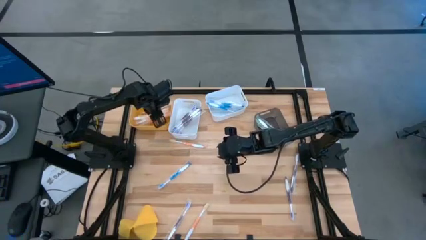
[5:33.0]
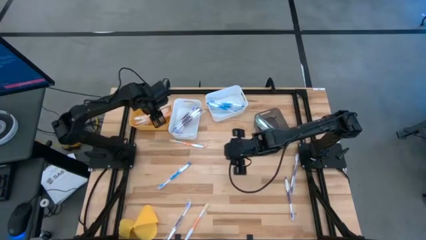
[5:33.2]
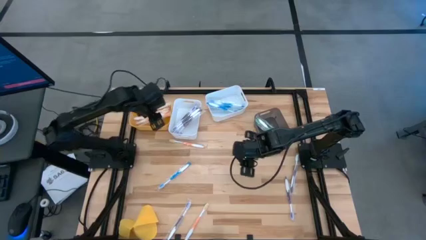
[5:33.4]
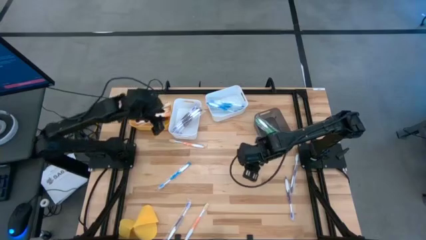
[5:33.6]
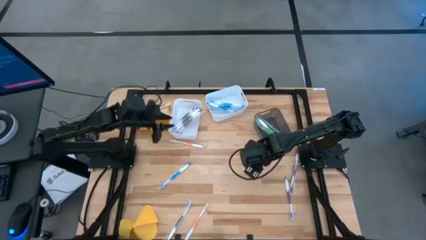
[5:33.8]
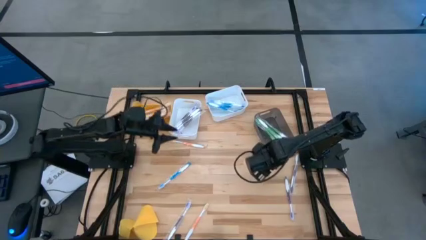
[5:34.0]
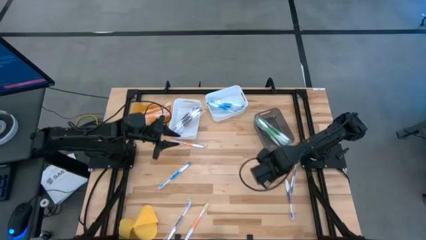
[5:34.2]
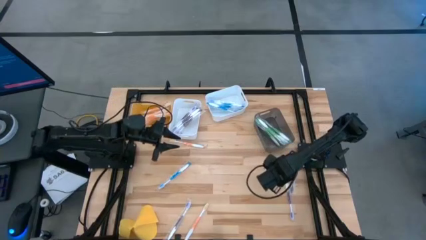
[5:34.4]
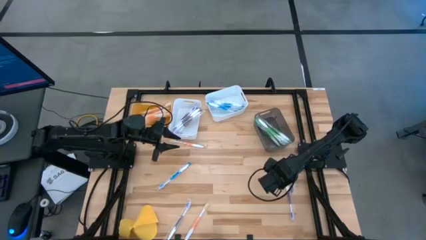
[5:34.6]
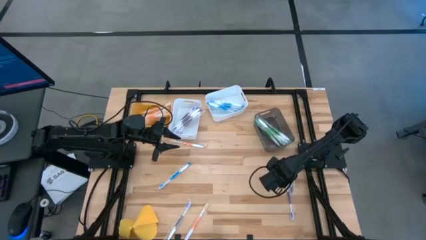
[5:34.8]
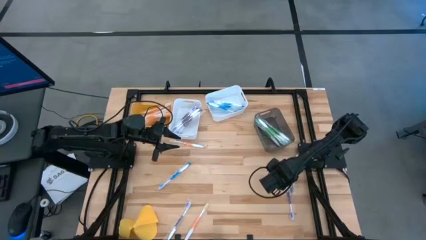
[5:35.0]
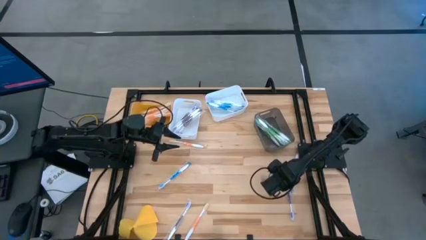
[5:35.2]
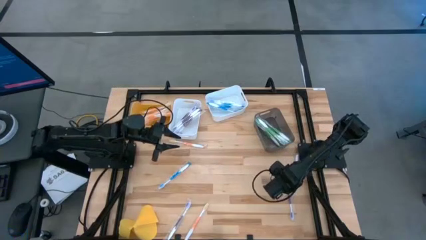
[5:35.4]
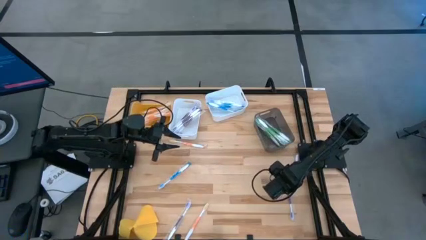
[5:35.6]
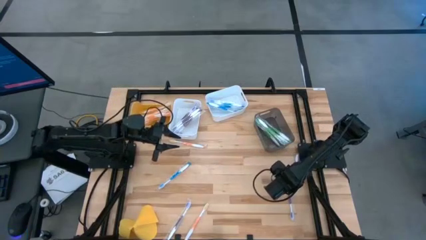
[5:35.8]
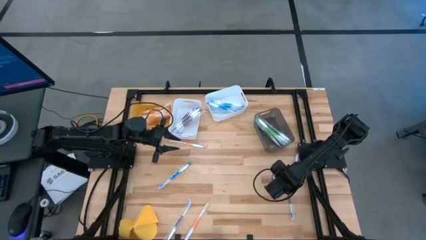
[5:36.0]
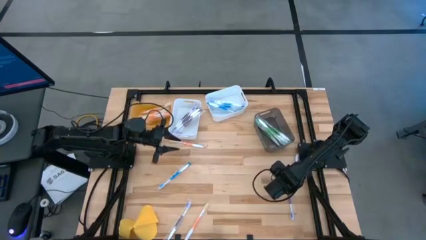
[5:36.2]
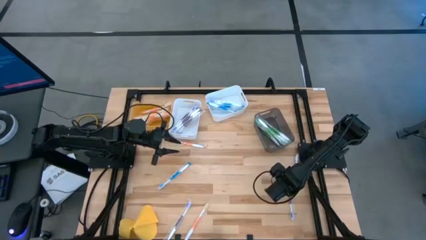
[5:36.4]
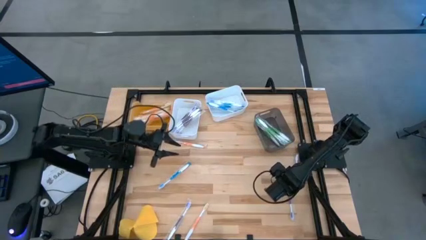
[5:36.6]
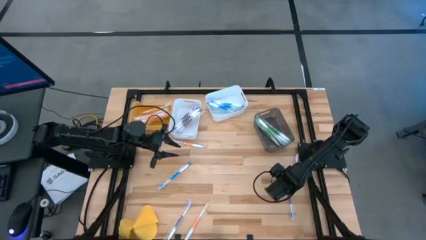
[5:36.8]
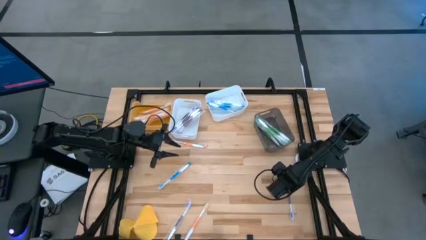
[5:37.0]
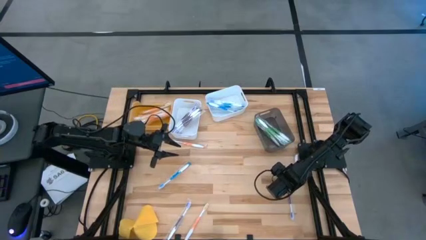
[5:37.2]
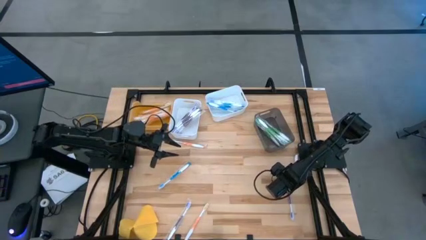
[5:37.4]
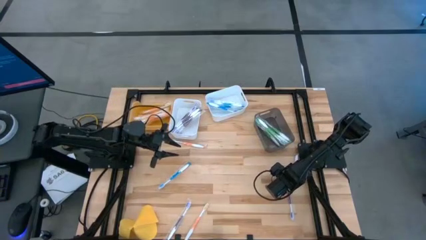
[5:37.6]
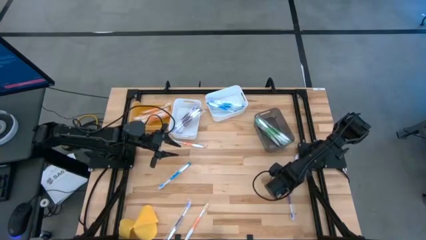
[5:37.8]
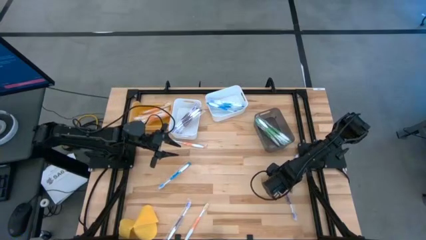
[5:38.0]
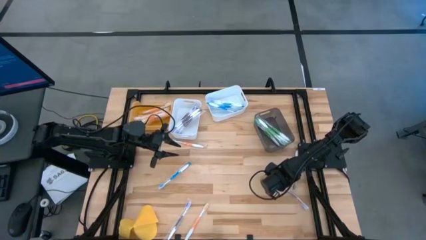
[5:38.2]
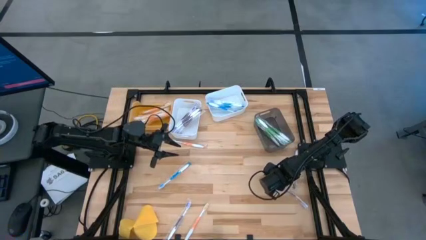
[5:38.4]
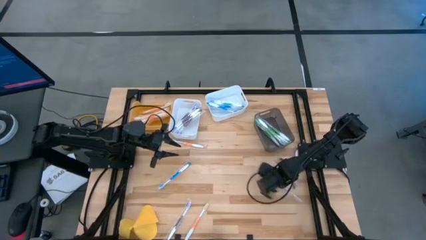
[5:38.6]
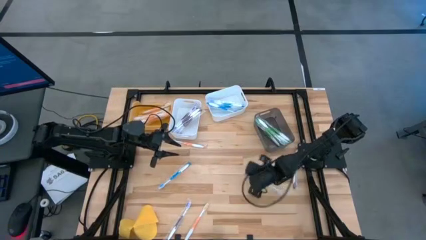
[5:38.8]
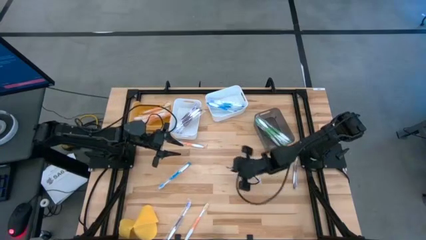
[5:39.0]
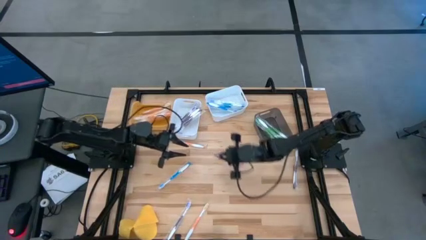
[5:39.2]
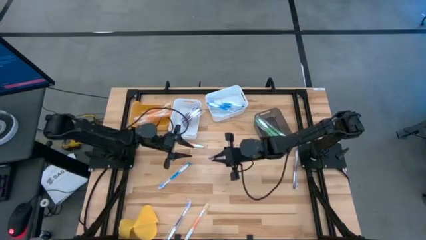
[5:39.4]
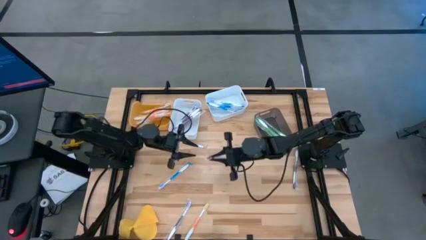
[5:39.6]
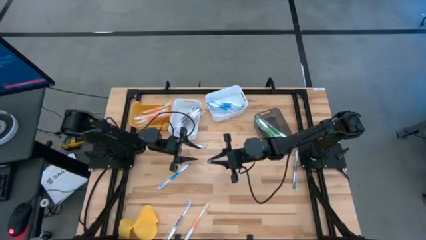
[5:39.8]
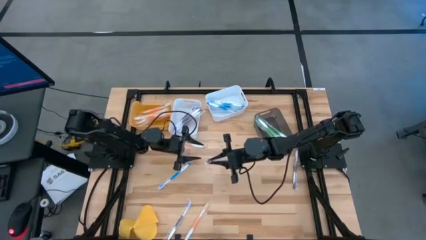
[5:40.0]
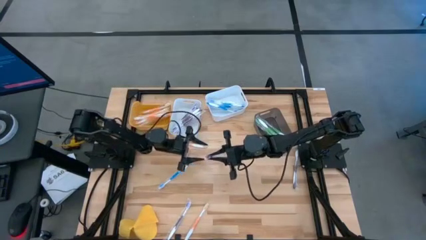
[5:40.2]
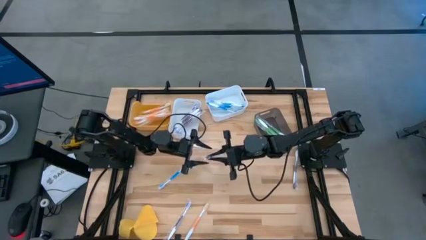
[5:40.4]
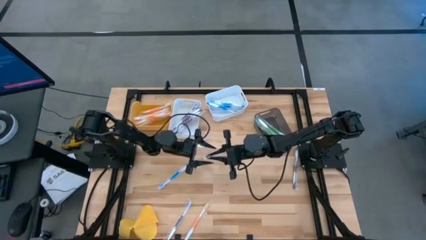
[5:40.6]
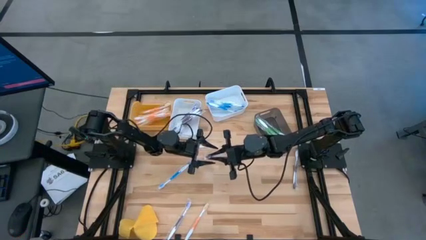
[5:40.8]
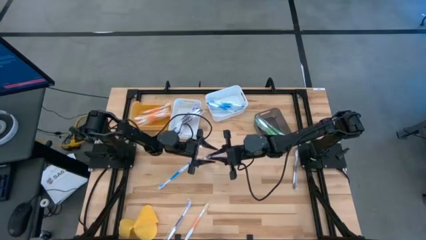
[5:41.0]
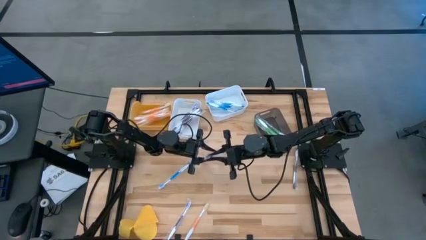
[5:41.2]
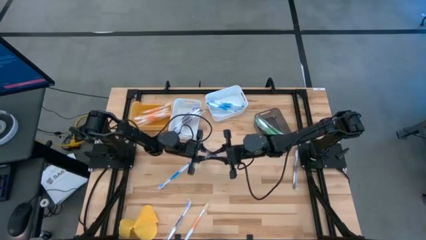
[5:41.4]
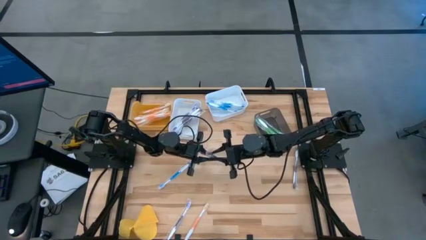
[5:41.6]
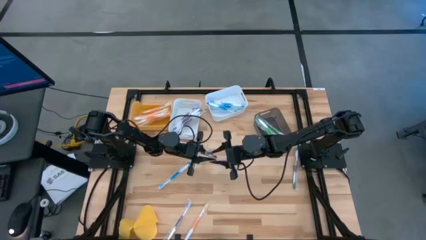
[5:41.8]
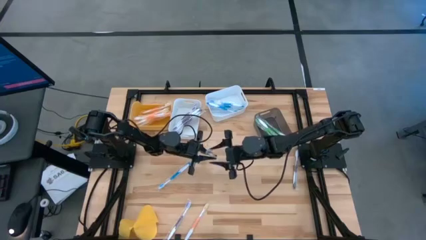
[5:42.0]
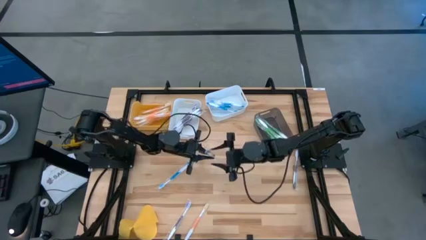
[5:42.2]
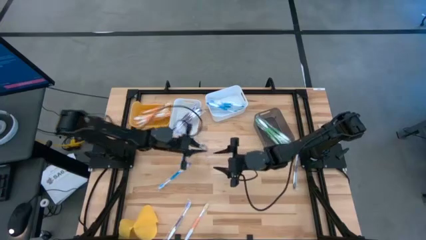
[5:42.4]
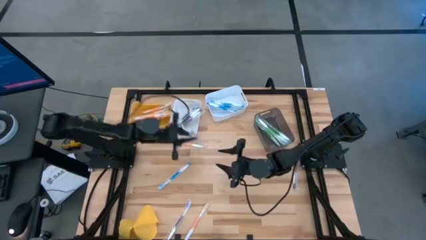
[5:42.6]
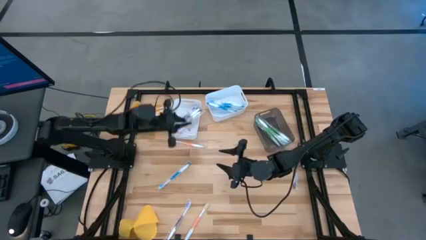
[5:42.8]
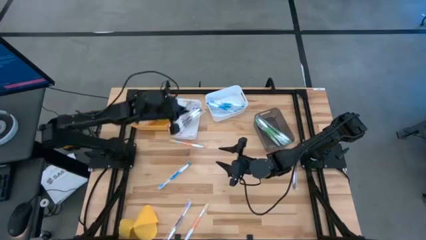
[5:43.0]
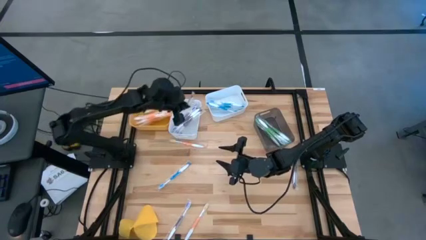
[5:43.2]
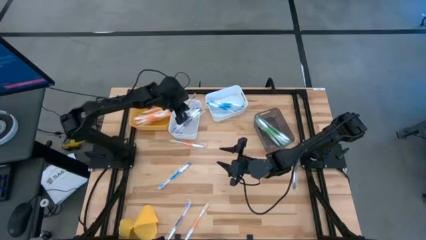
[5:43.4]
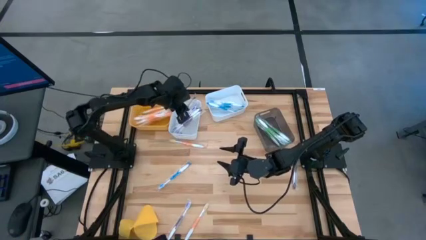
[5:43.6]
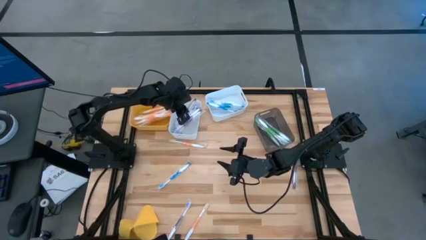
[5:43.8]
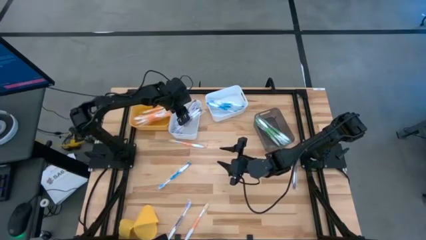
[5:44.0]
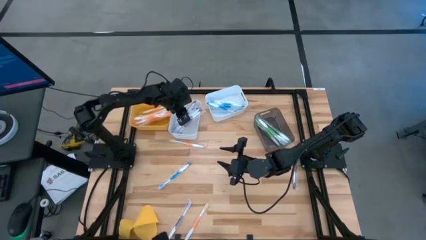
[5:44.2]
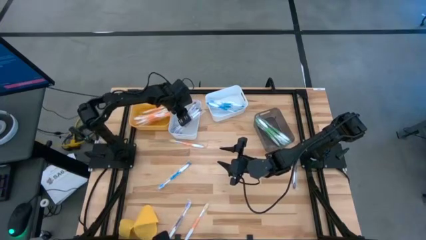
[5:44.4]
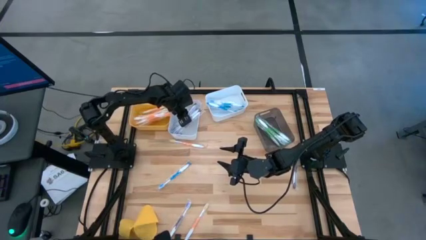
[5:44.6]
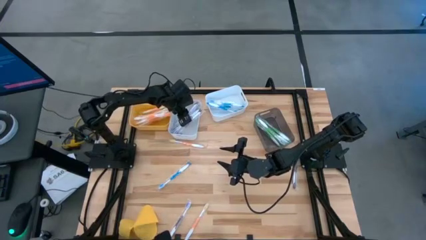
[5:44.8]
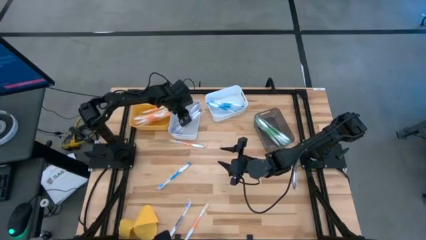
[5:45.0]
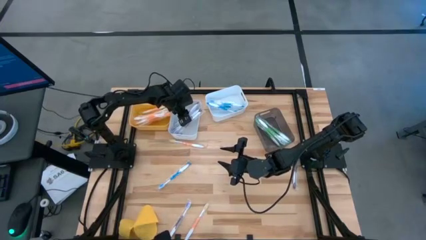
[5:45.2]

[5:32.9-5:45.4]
Task: Pick & Place Toothbrushes
Put the purple toothbrush into the left white bin
